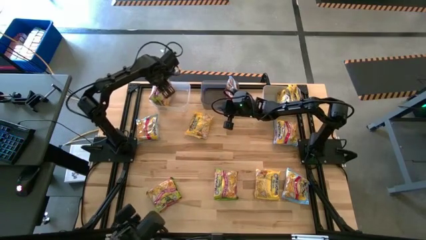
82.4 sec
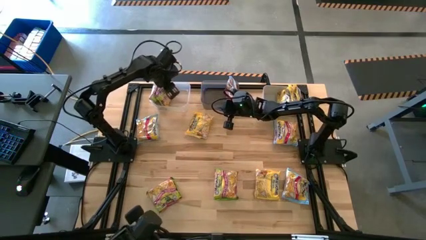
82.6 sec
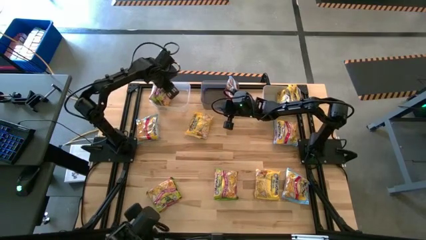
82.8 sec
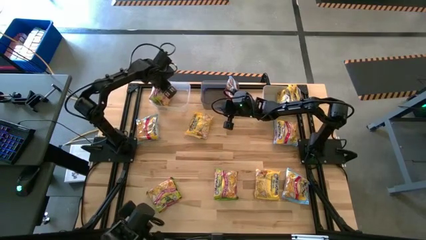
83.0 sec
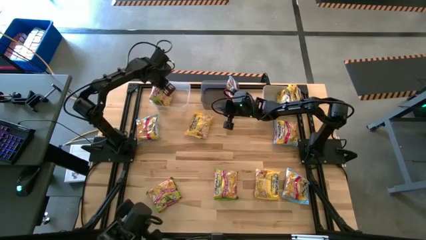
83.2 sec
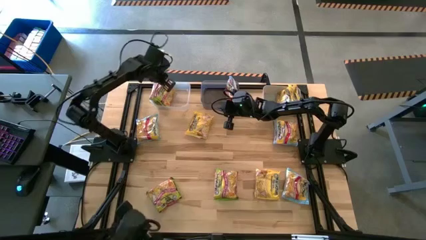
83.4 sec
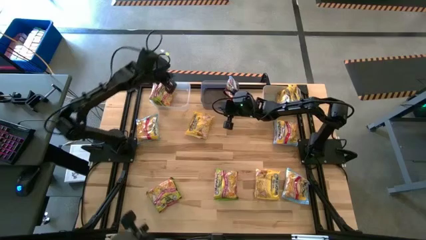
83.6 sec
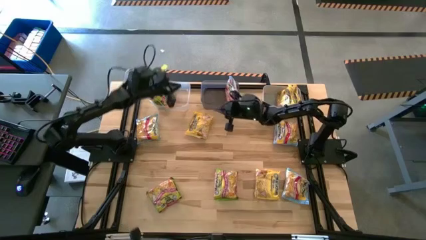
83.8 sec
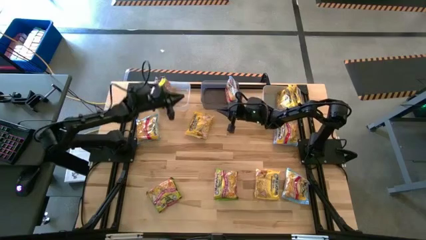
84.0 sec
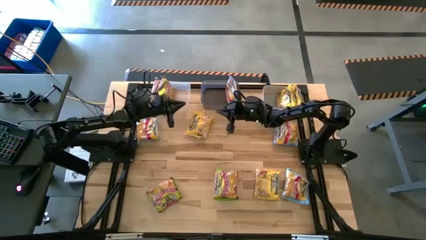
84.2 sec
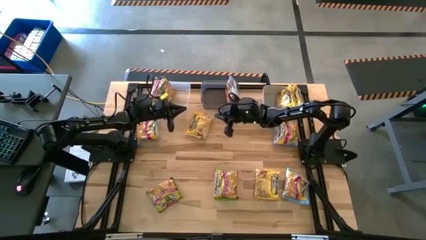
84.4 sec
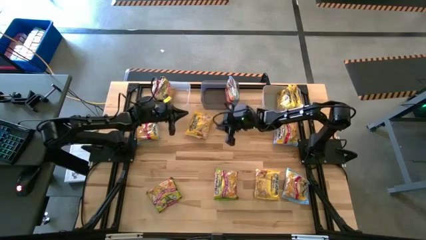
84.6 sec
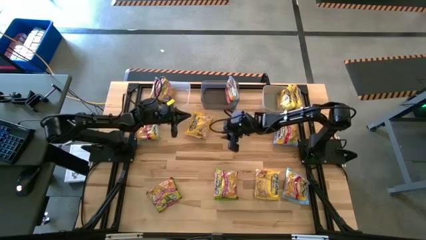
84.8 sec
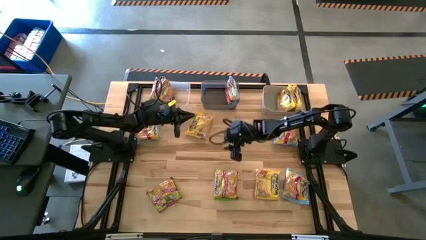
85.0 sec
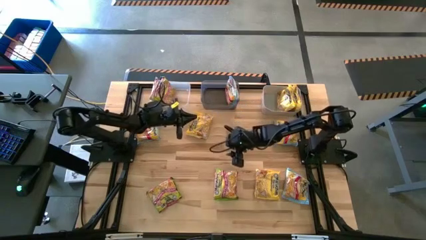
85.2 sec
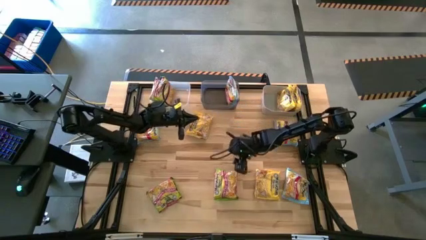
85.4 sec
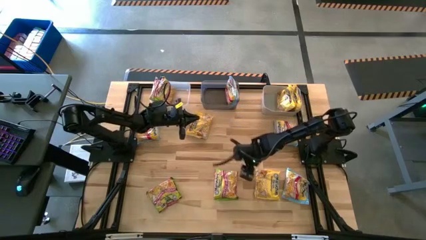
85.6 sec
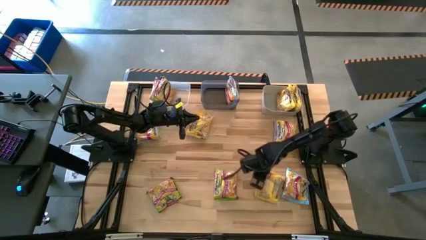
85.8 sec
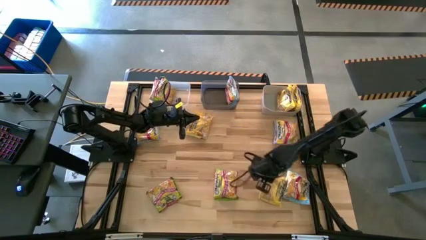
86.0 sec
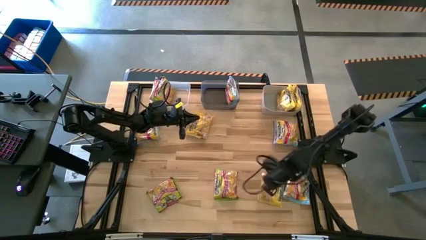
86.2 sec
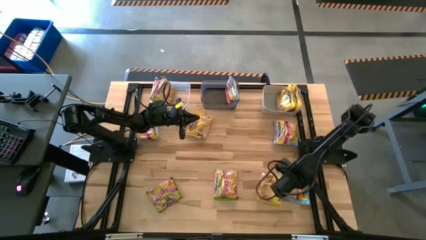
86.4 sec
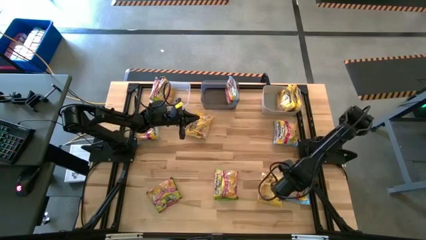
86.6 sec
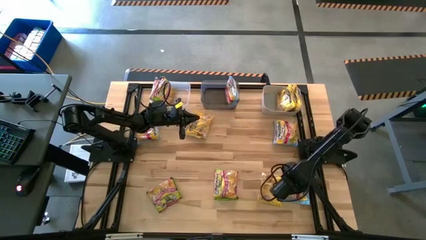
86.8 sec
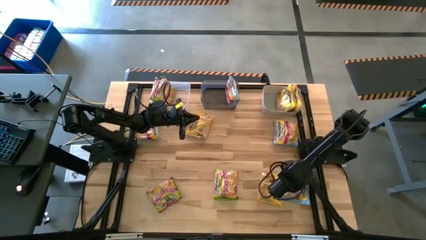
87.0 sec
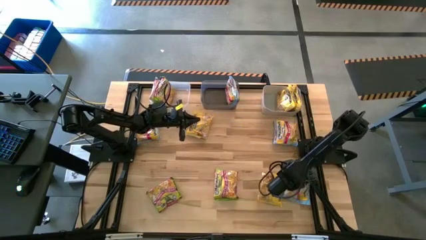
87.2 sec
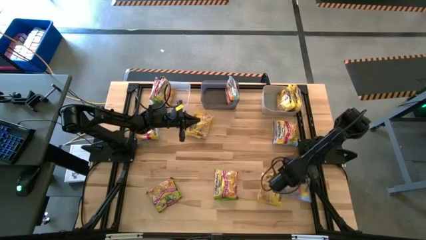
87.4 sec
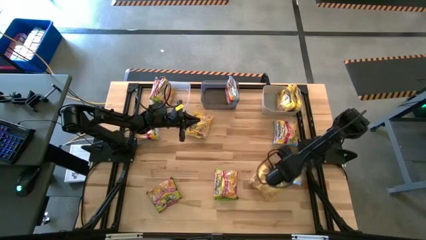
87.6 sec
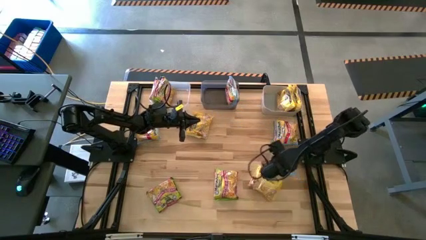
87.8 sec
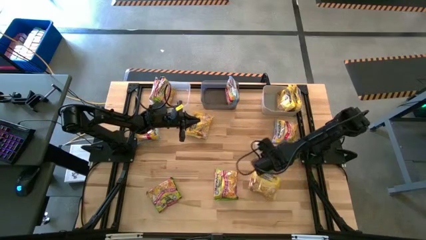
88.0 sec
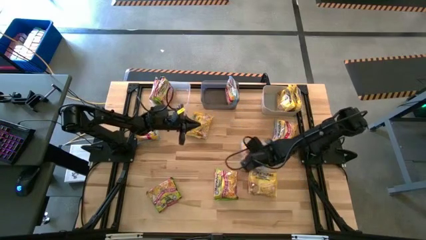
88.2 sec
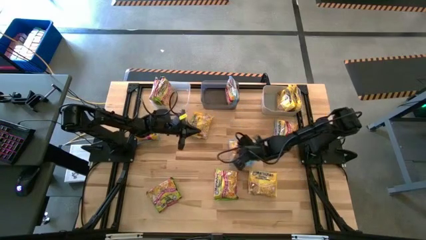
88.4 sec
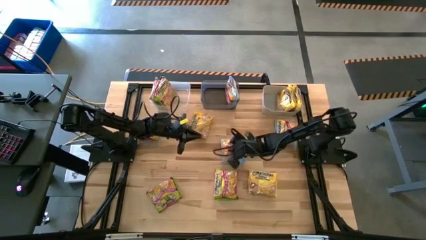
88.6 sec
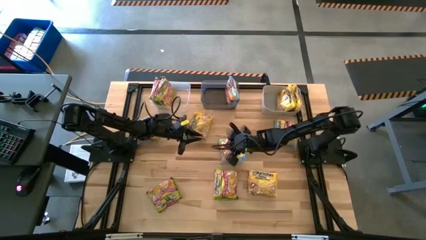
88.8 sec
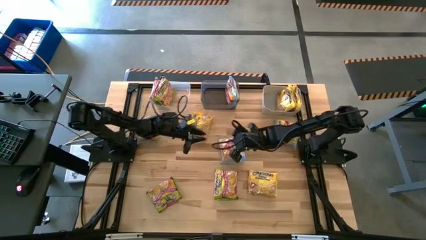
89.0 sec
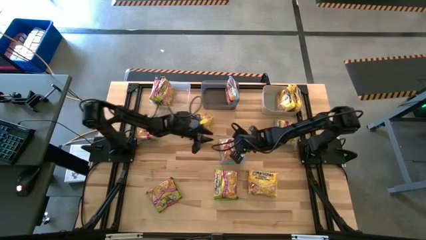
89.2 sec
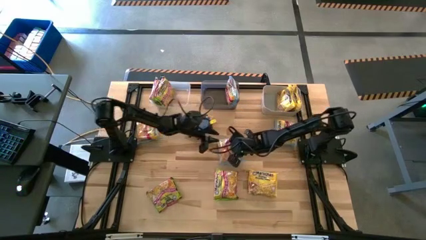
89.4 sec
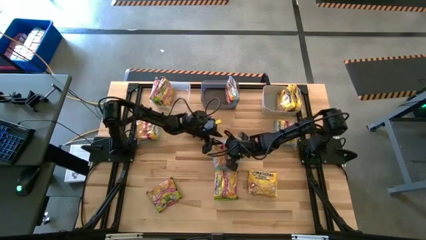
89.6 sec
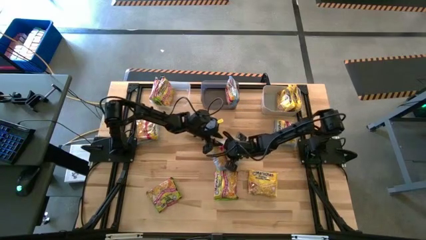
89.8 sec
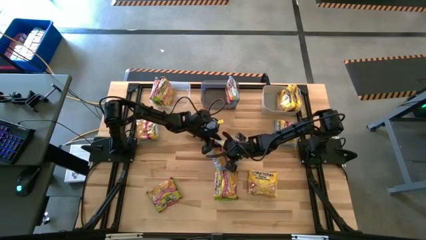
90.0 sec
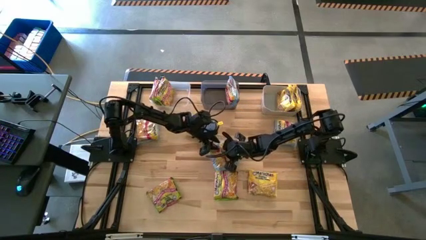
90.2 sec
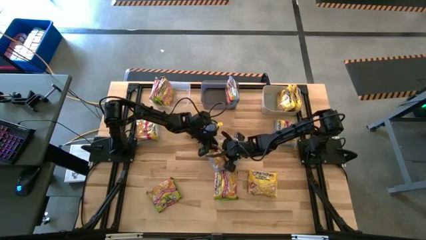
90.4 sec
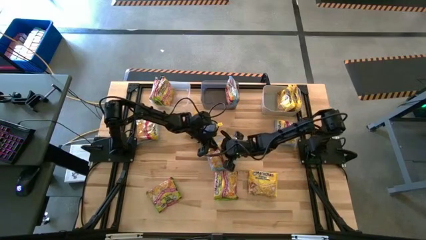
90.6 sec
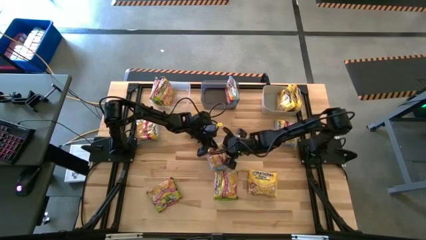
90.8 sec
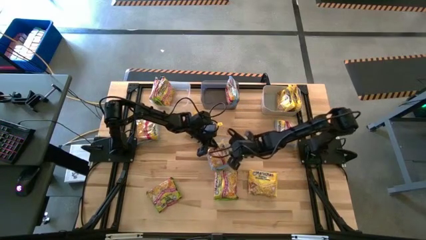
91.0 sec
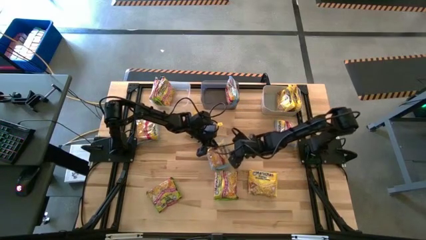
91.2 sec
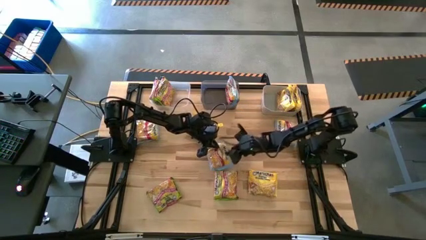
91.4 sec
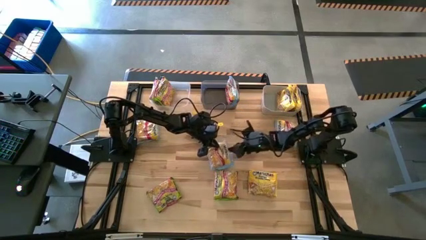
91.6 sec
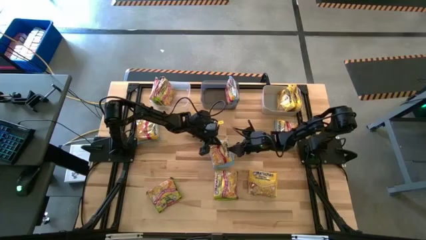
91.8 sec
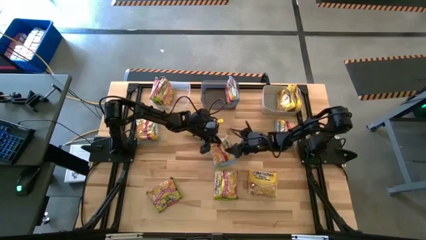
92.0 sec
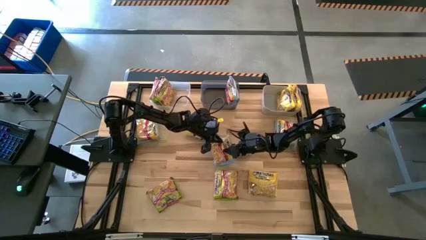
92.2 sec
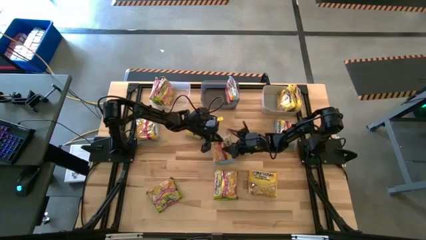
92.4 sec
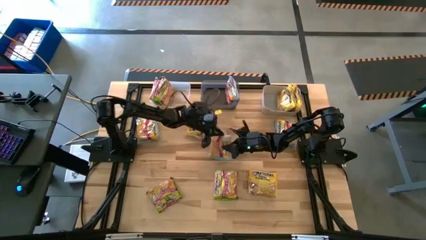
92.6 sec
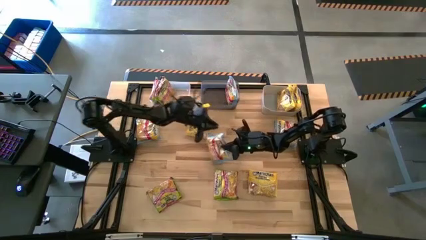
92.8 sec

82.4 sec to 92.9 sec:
Task: Sort Maruchan noodles
Put the bottom right blue noodle pack into the black bin

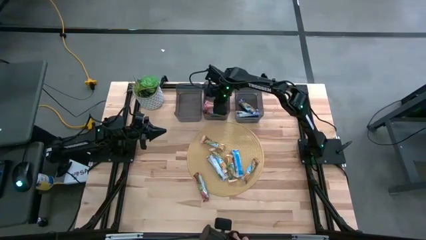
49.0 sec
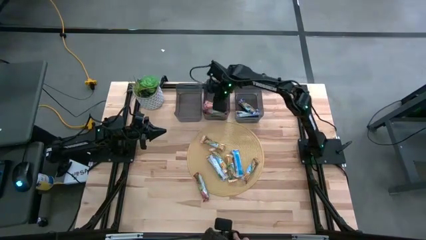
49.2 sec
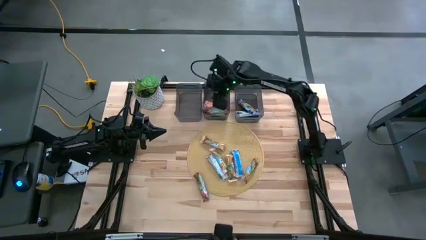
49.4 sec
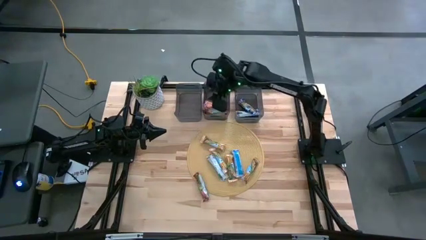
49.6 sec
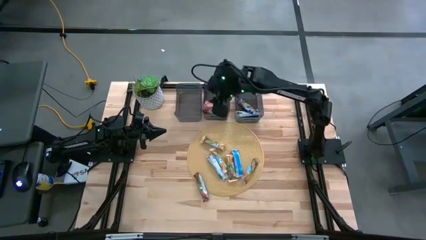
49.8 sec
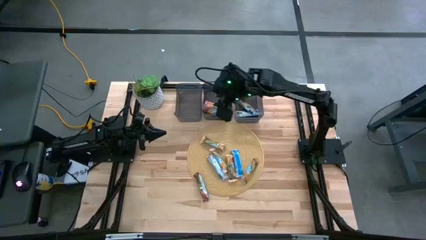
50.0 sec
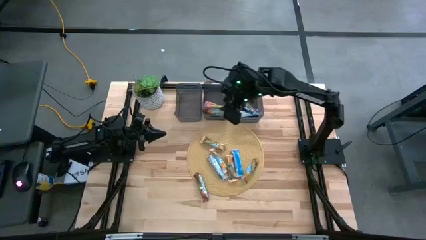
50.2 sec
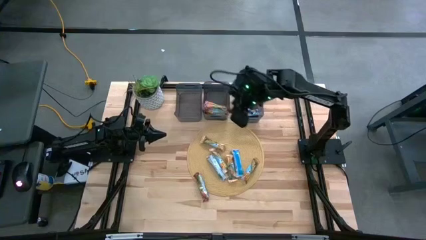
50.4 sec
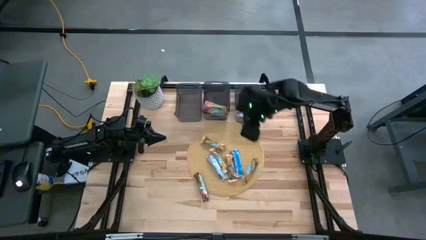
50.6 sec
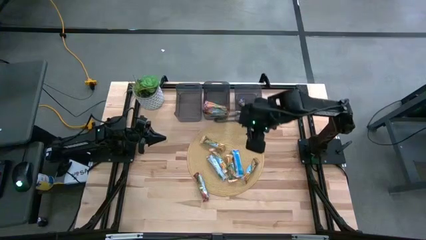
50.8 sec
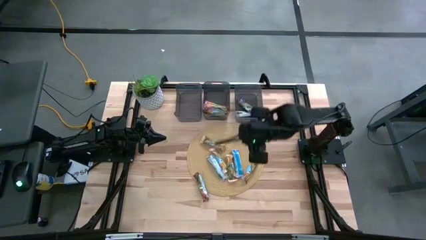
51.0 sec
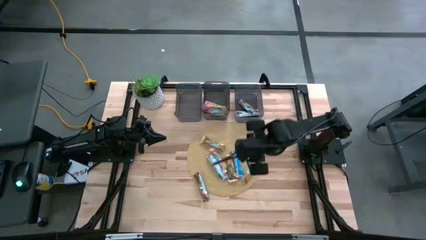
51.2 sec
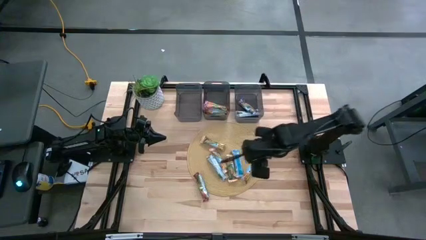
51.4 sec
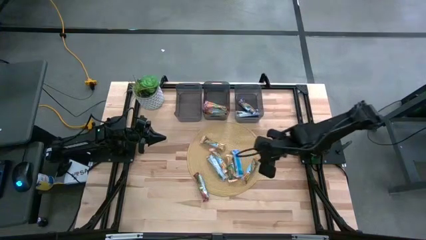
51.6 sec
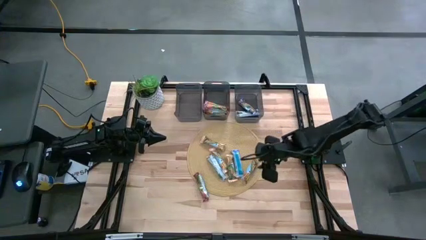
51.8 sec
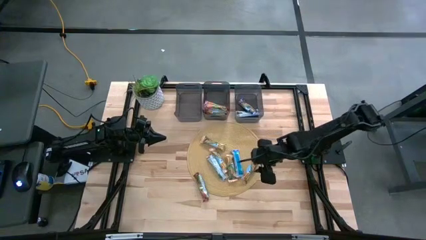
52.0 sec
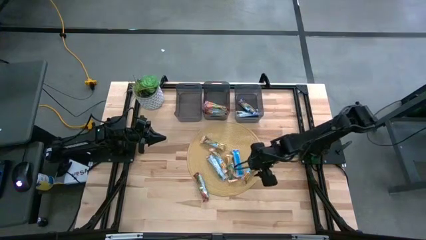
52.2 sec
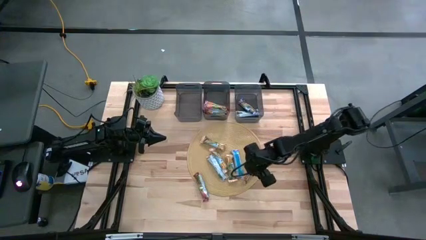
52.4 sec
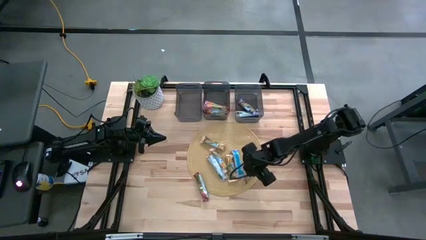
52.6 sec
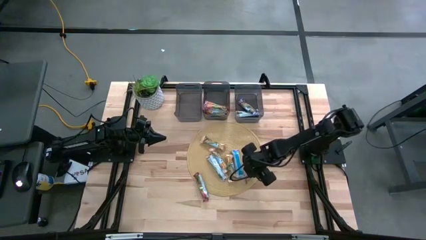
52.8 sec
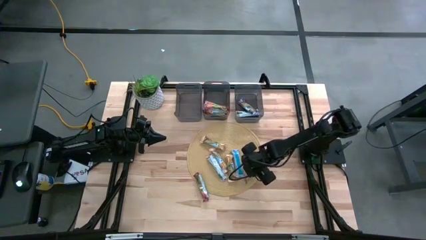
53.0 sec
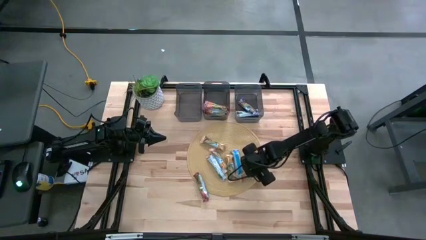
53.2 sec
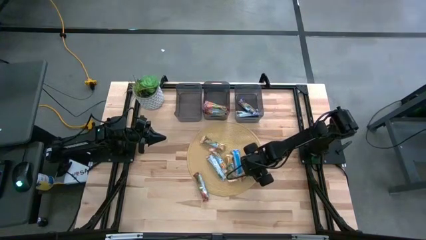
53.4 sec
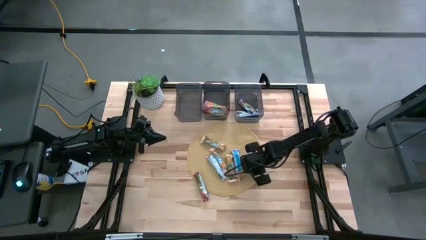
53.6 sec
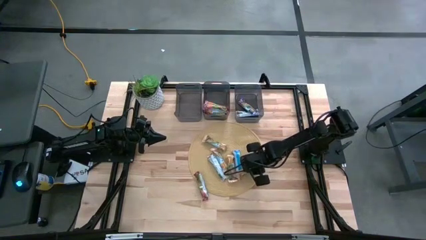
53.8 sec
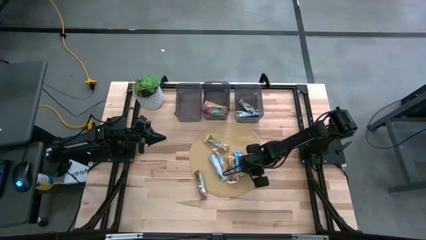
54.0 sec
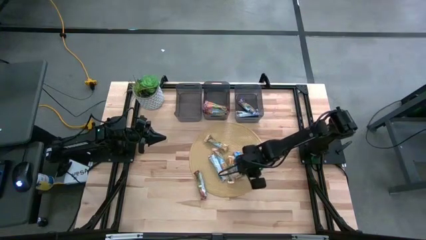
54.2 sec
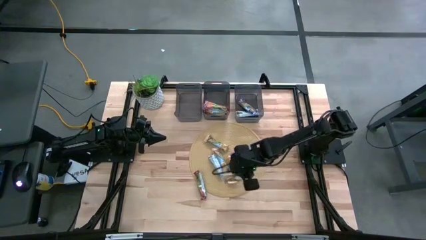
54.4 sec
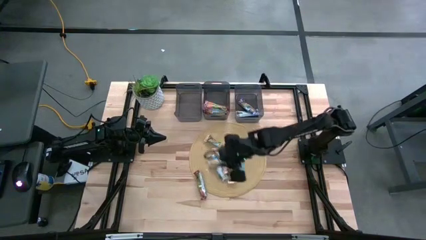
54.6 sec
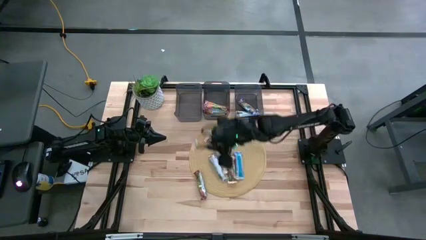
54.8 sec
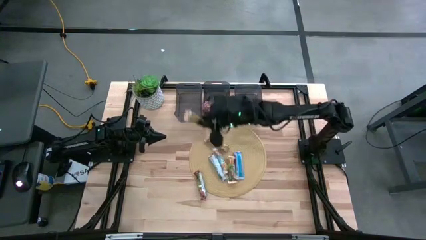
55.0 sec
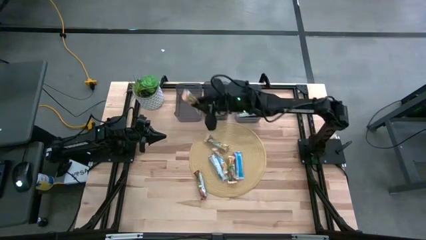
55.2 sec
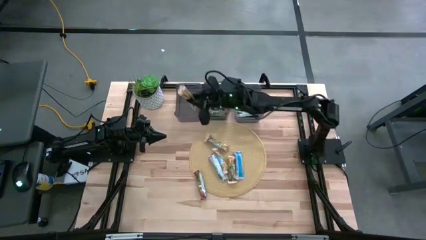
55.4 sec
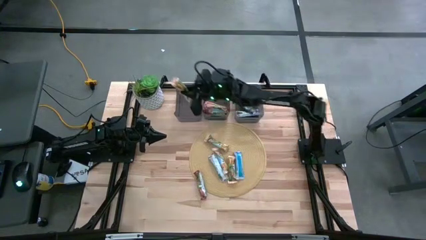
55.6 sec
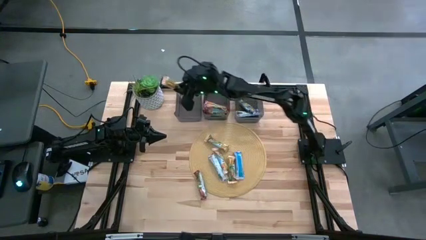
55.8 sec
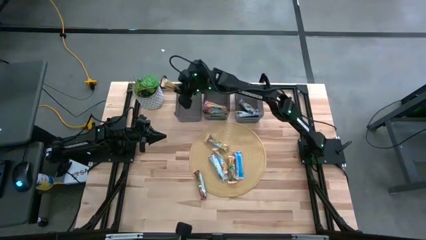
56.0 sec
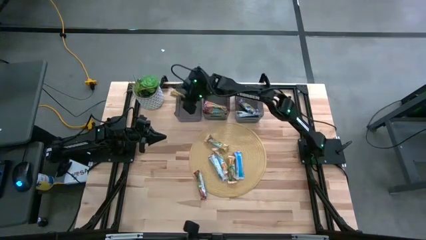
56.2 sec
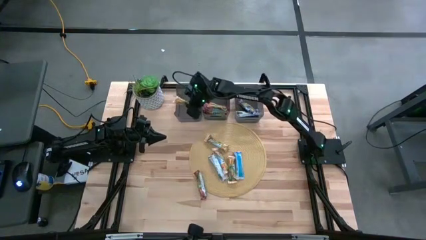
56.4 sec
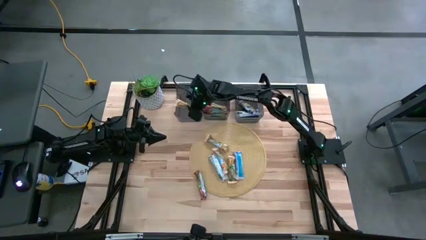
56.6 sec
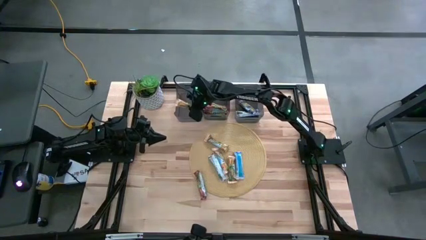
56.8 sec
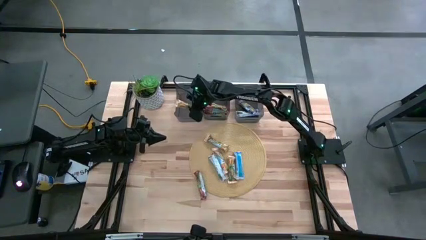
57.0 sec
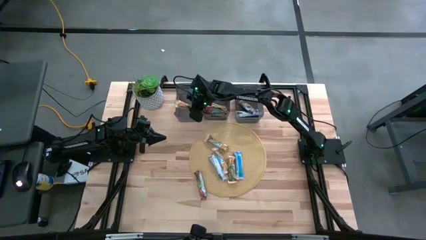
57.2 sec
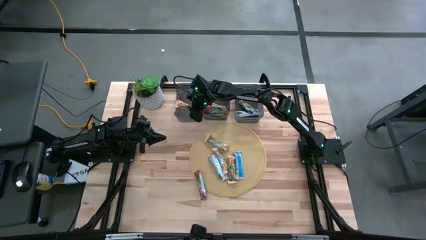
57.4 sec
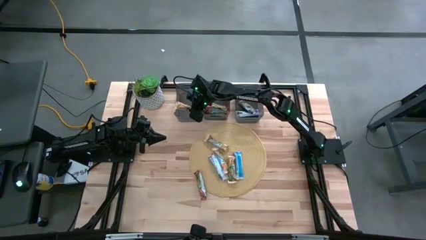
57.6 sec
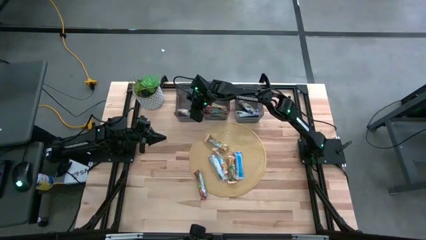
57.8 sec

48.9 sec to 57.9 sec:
Task: Pick and place Granola Bars by type
Put the yellow granola bar into the left black bin
